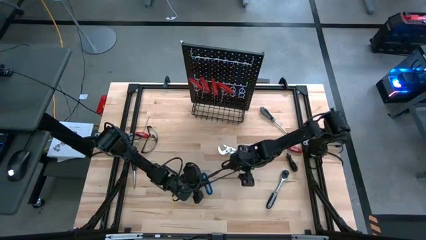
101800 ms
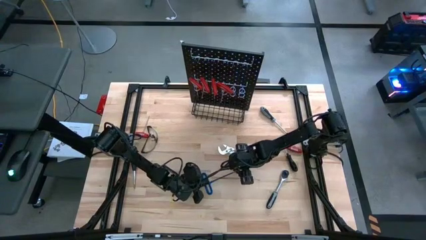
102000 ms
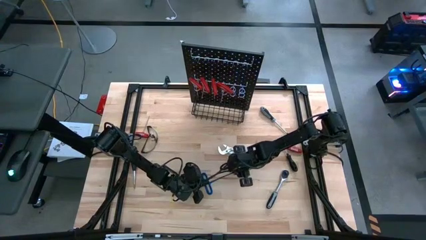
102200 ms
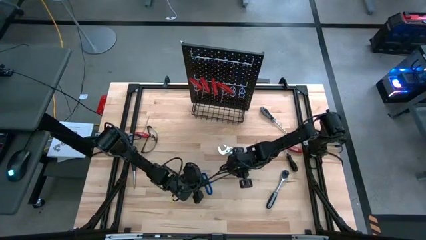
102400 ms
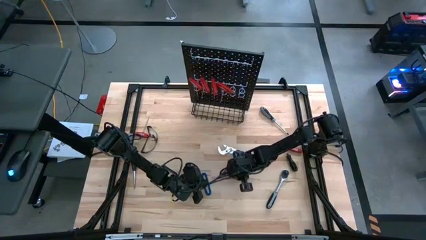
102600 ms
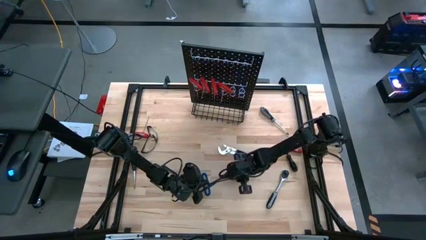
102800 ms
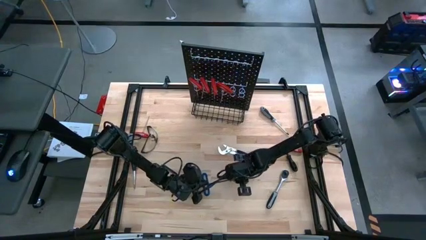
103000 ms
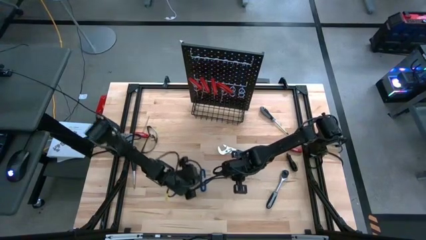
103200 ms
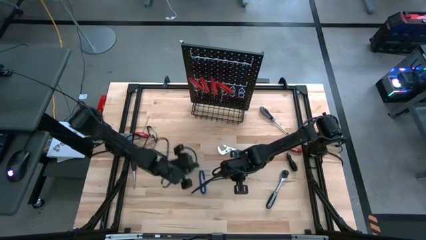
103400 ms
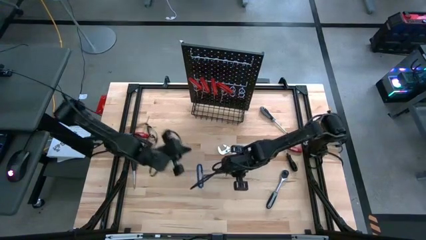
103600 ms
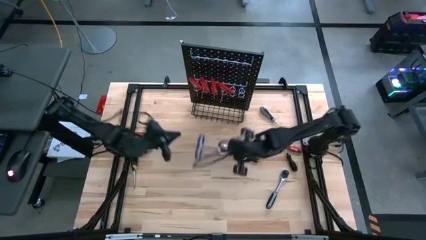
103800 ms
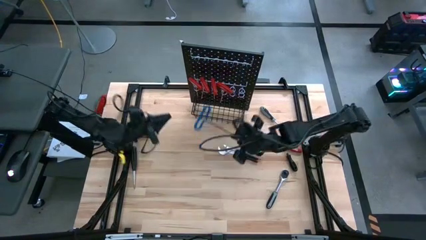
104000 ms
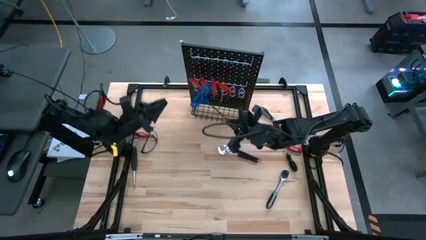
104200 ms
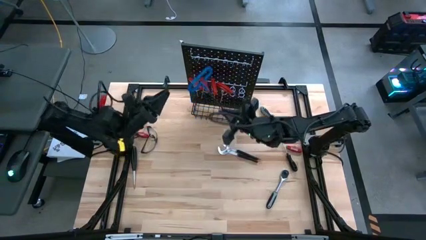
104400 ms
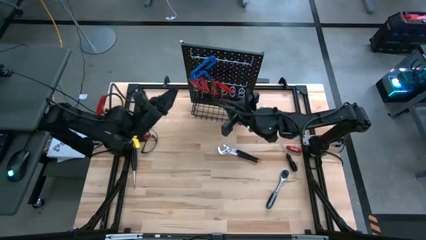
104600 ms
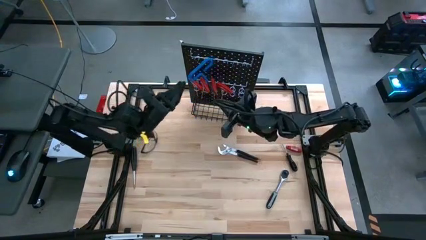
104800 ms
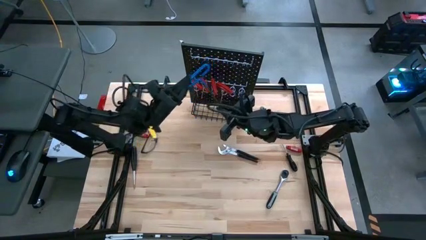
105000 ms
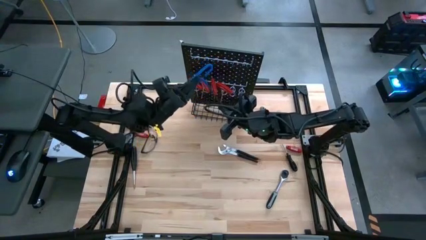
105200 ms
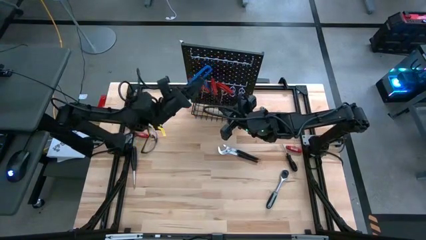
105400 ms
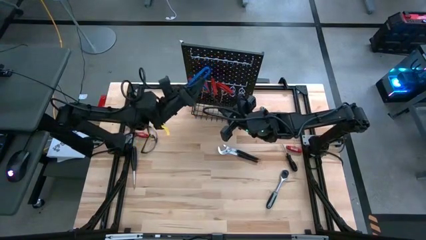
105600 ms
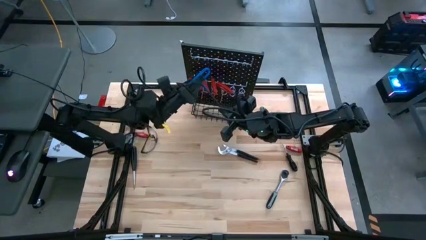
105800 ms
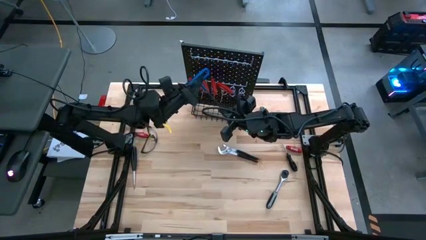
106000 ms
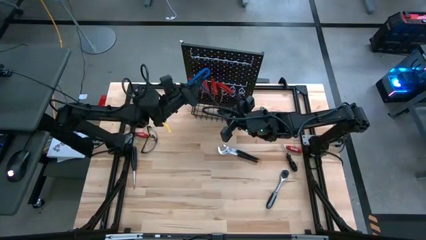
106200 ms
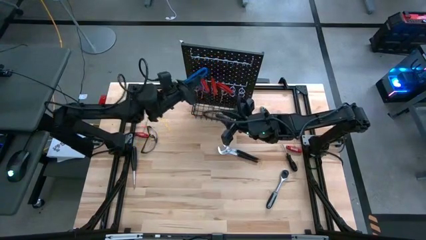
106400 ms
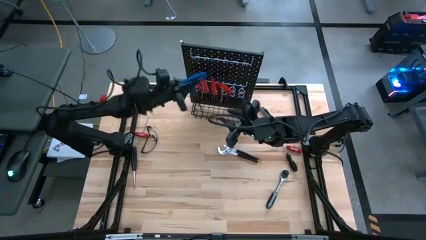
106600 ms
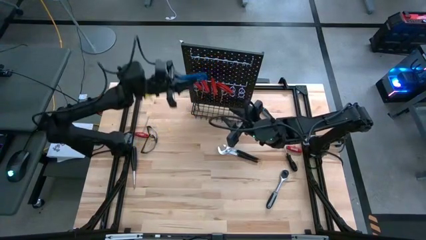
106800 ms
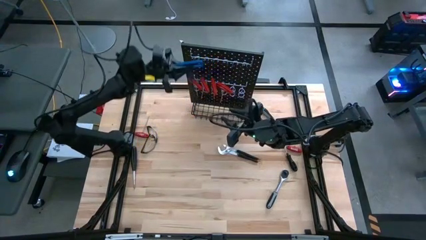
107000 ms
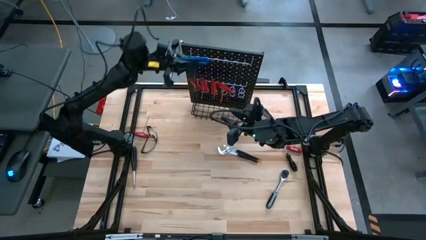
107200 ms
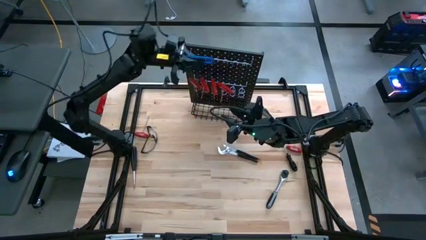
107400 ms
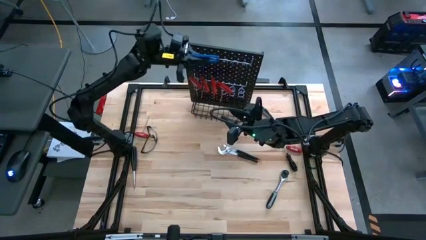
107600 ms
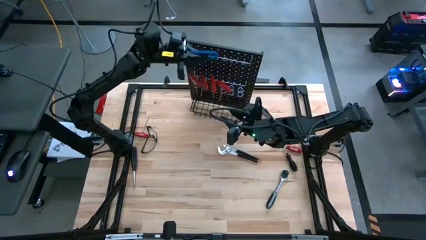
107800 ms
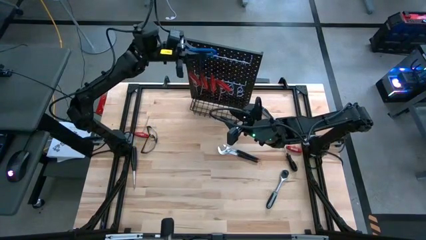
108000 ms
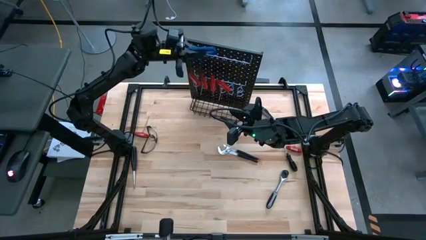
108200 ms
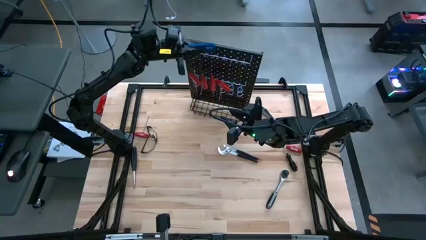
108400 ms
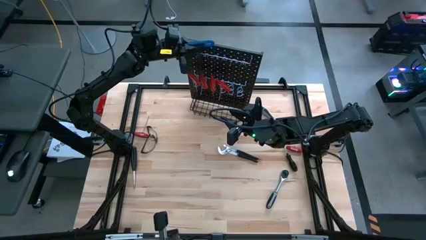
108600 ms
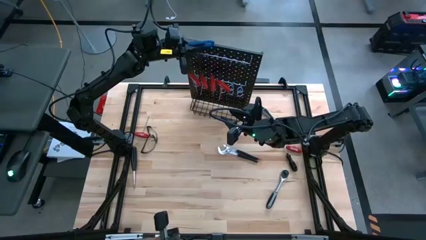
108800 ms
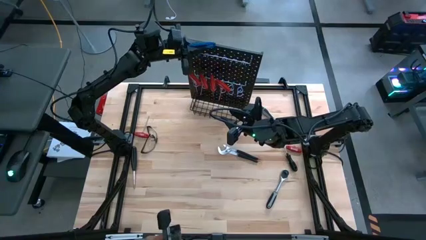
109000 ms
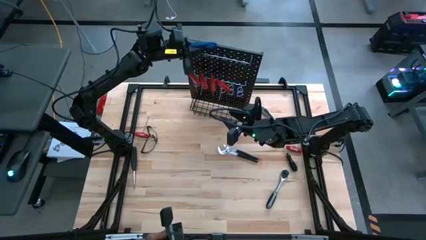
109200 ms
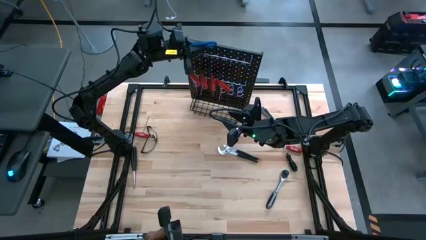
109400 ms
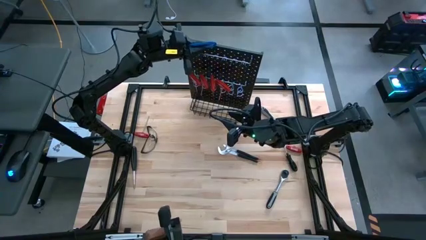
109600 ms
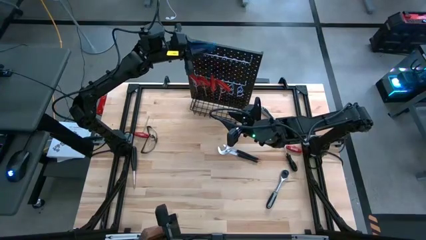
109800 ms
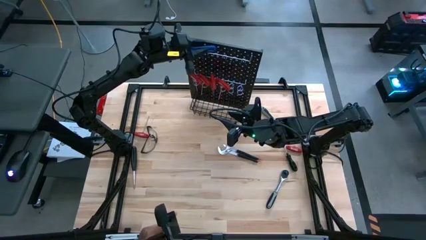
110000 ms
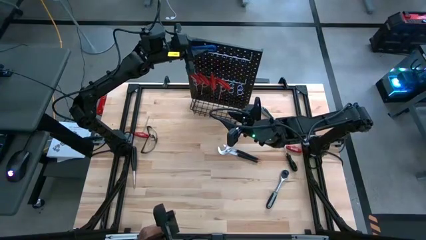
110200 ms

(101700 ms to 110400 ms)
Task: Hang tools onto peg board
Hang the blue pick tool on the pegboard

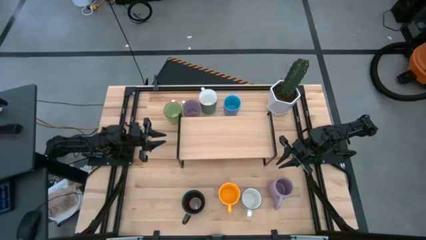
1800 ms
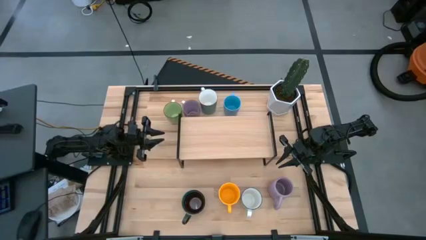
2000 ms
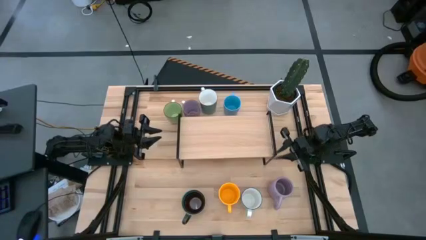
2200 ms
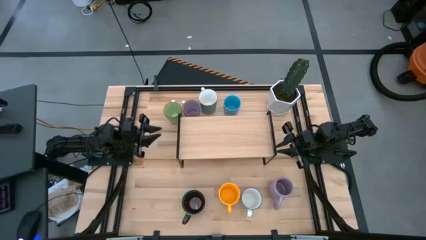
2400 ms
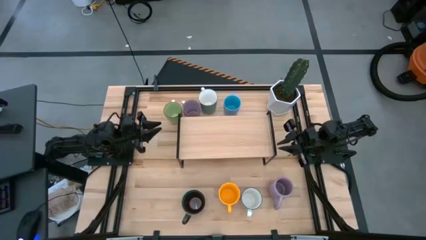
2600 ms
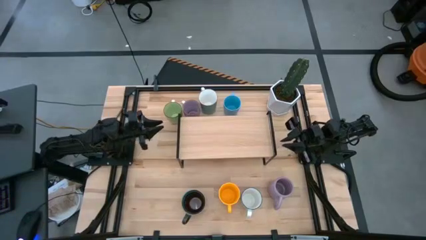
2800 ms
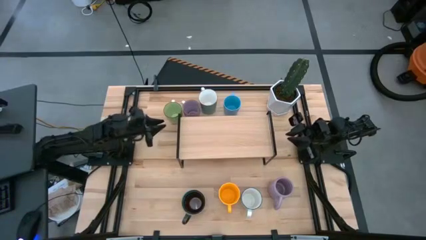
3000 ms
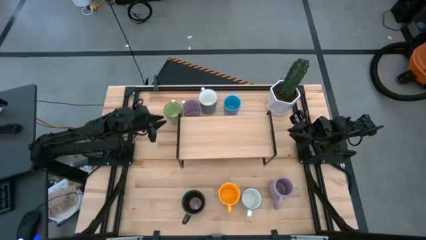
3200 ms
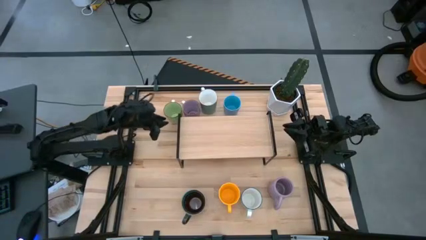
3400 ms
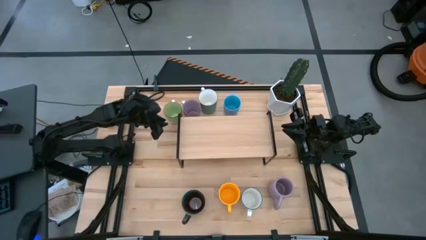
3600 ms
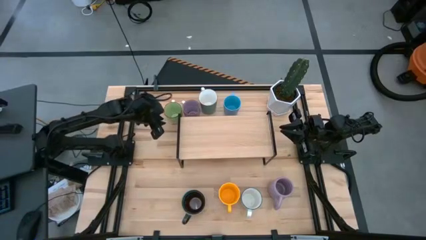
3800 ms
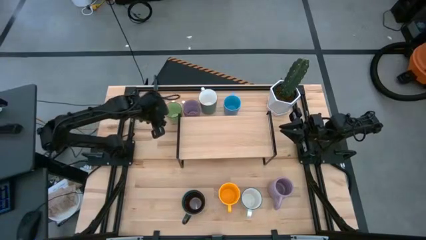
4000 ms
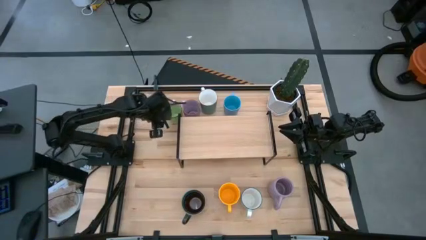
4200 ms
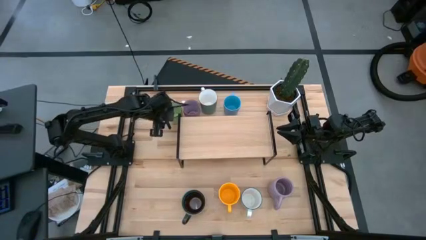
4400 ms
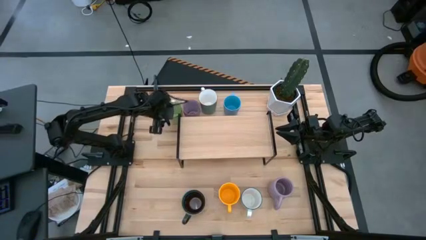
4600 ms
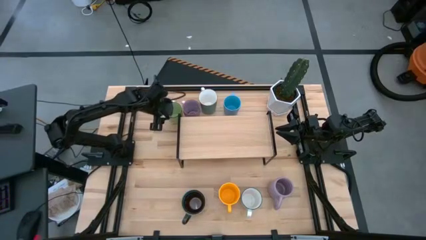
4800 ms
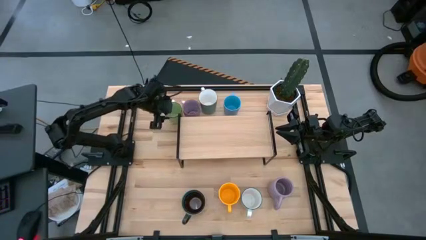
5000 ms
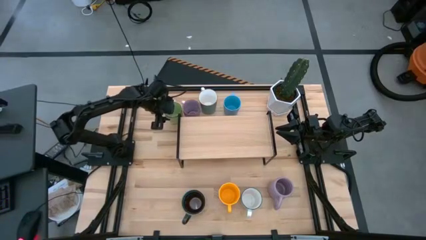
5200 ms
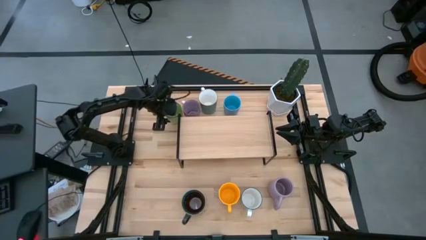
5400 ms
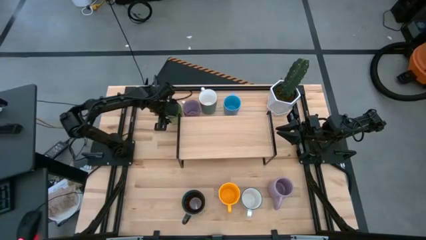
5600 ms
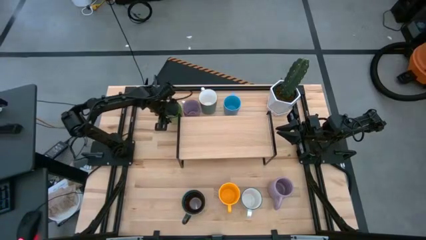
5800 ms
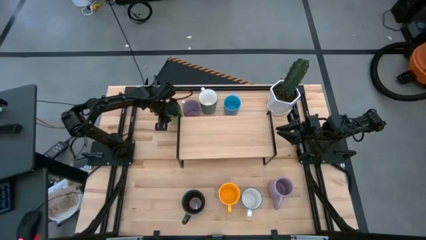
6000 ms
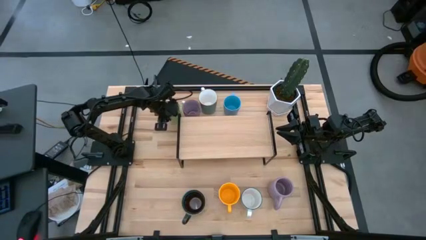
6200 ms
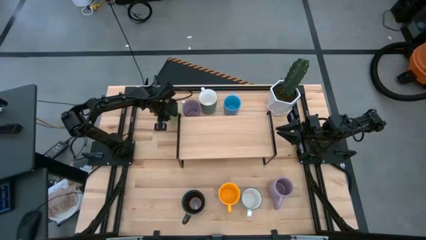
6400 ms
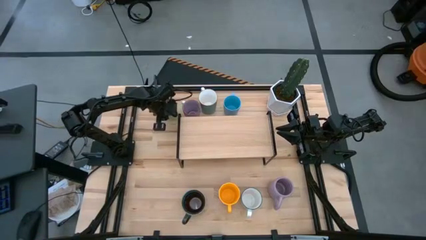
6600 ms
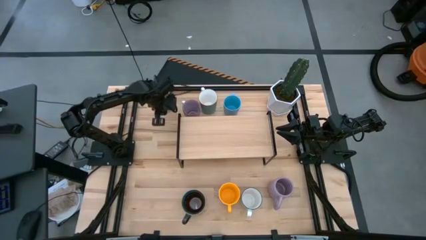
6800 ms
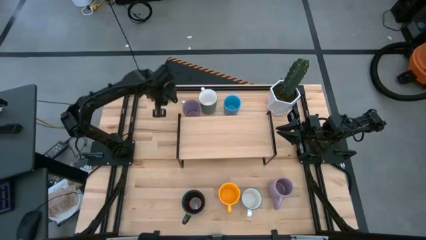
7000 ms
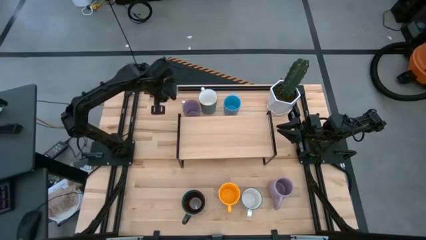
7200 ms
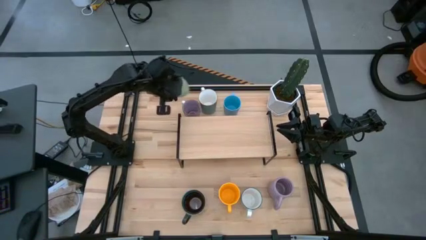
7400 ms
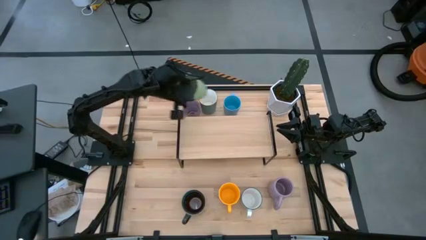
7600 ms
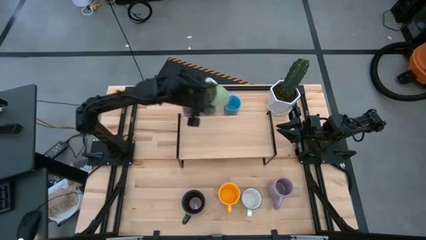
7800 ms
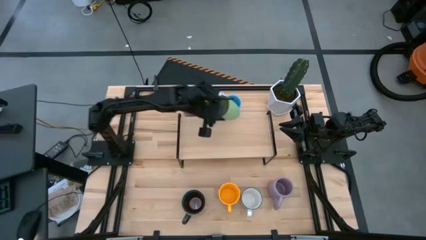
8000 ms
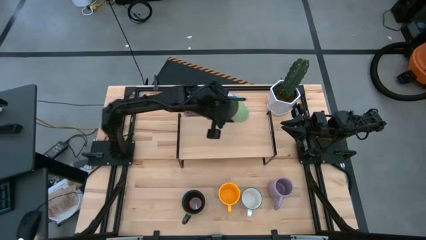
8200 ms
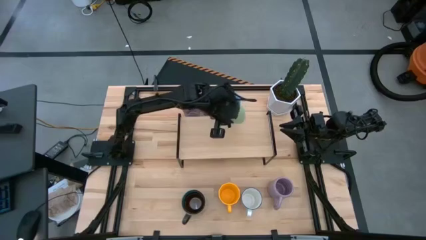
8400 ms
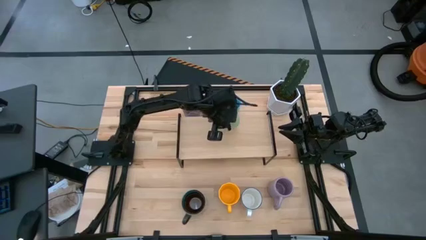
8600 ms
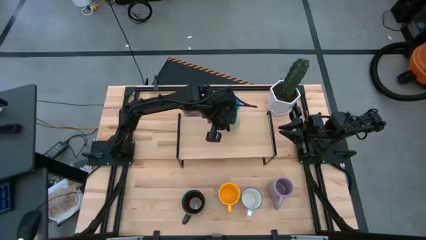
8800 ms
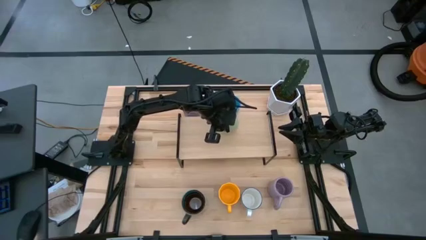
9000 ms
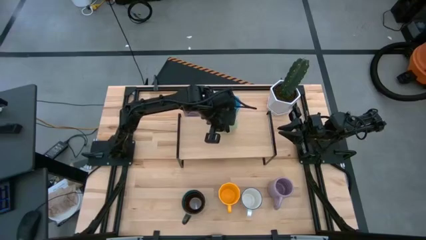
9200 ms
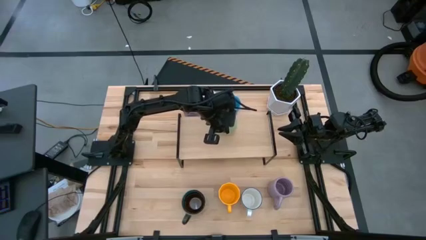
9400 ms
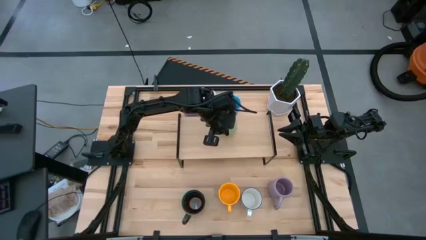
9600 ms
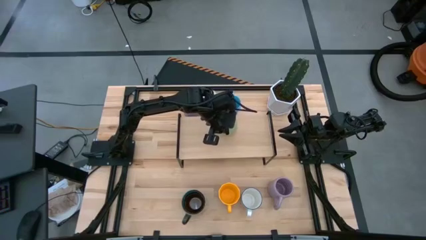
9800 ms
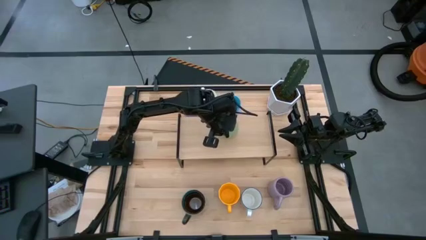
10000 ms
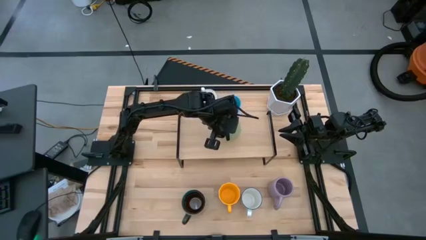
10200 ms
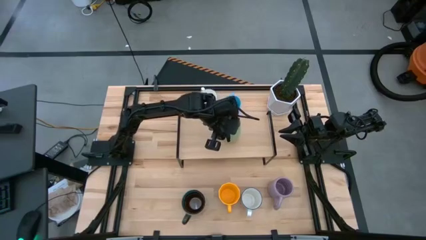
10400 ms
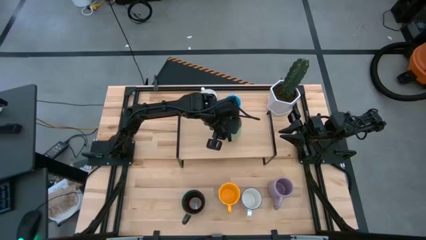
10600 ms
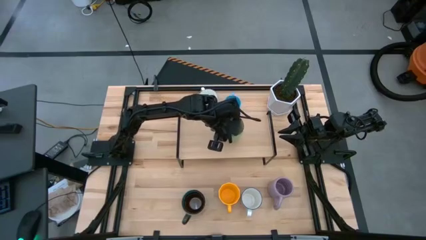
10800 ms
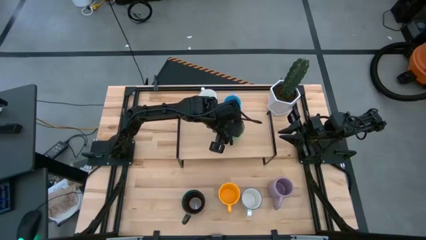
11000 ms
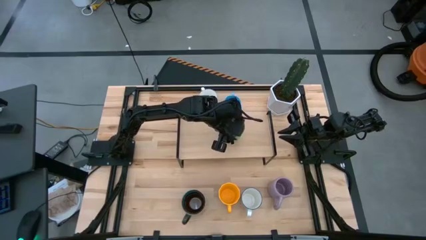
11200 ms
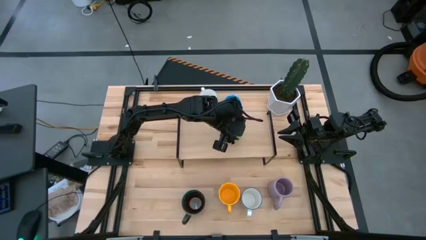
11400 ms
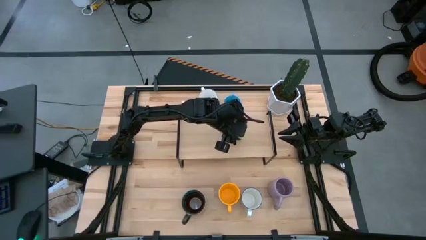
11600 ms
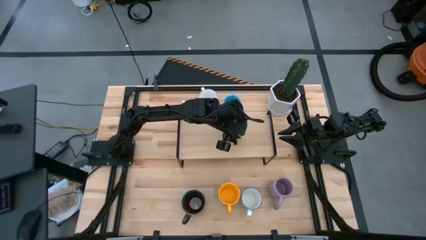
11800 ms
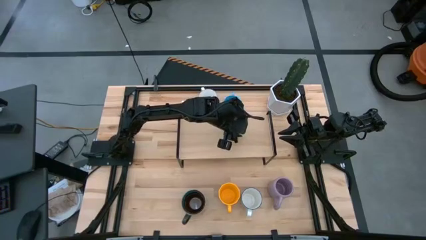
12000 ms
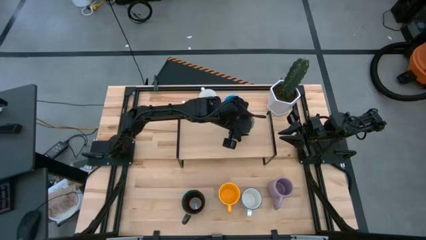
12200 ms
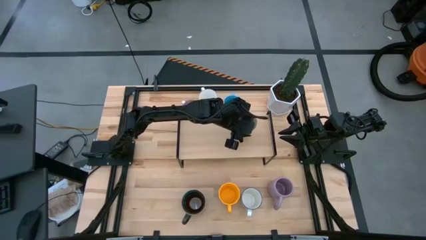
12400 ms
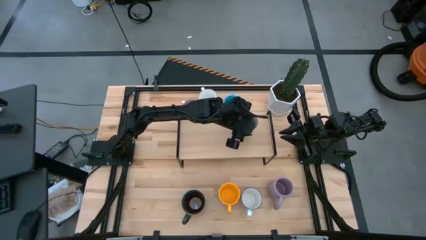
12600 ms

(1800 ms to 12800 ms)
Task: Place coffee mugs
Put the green mug on the shelf
